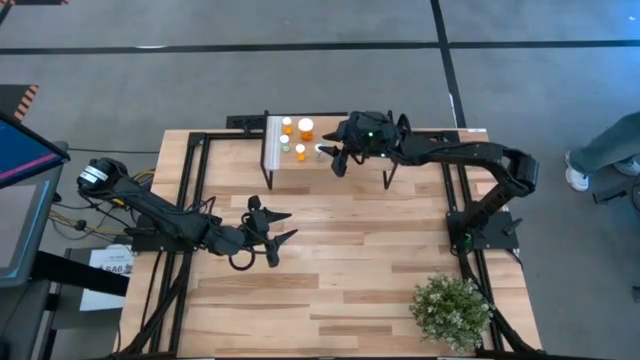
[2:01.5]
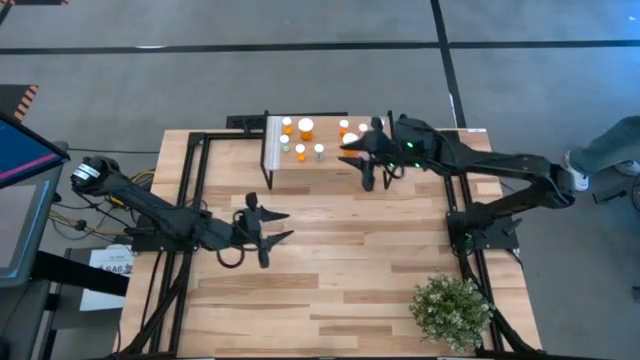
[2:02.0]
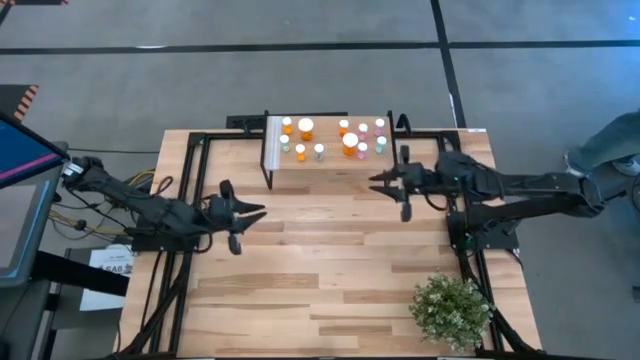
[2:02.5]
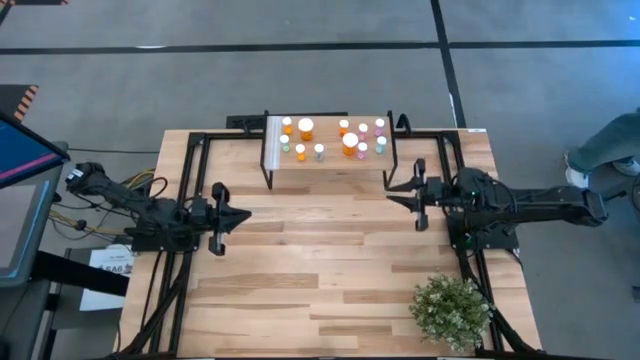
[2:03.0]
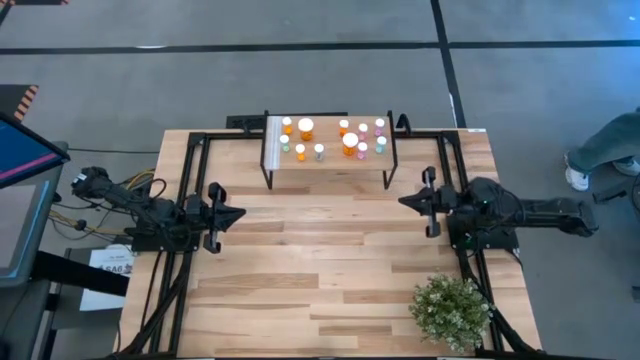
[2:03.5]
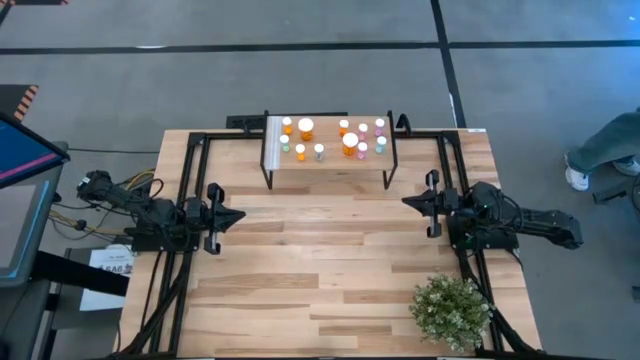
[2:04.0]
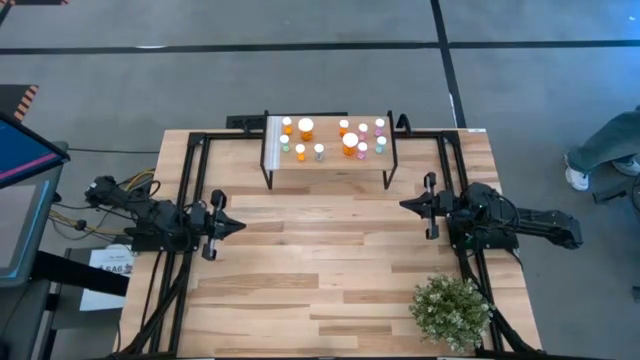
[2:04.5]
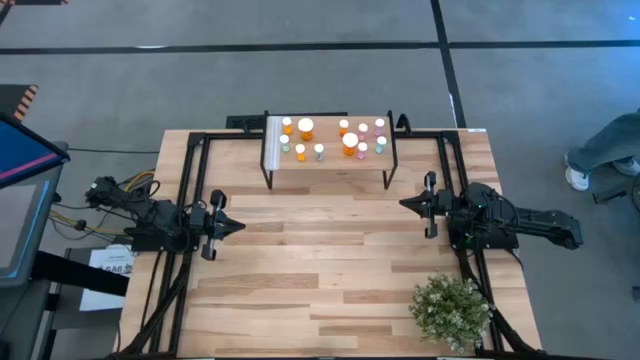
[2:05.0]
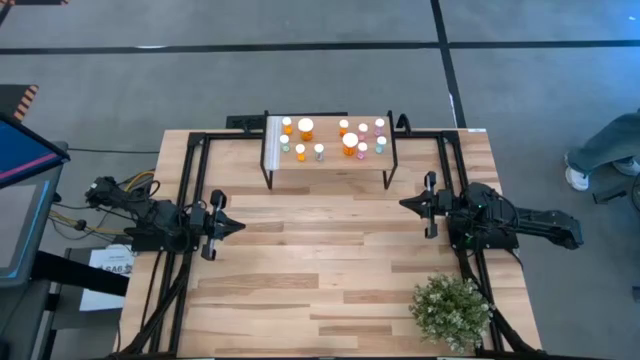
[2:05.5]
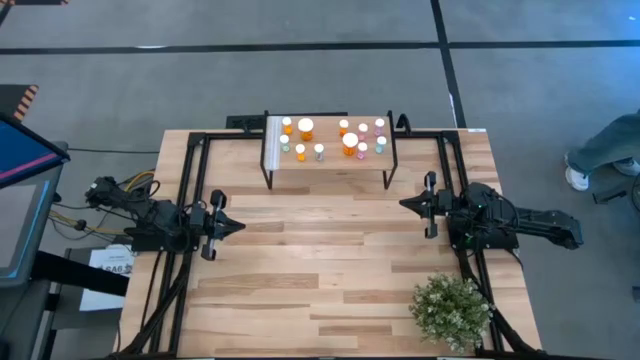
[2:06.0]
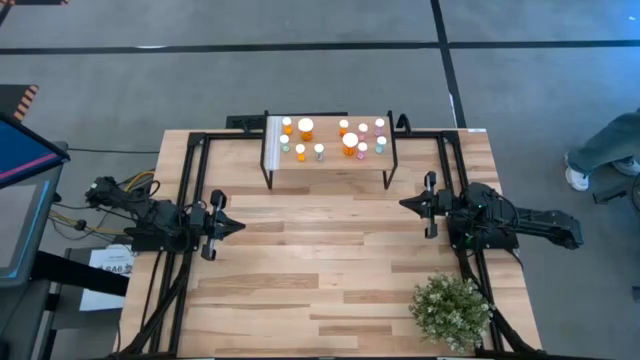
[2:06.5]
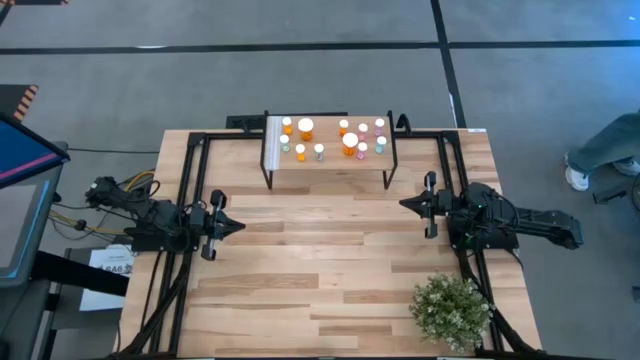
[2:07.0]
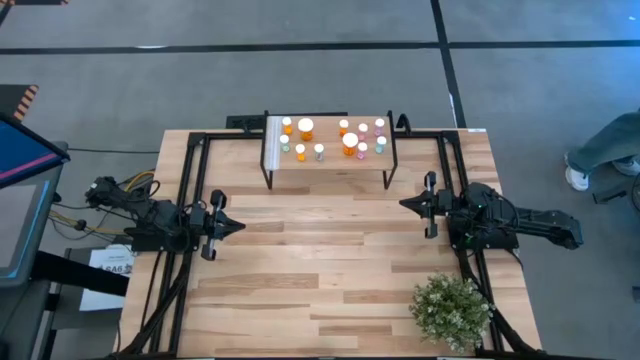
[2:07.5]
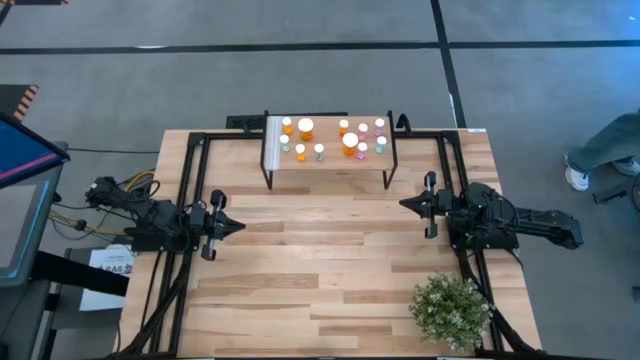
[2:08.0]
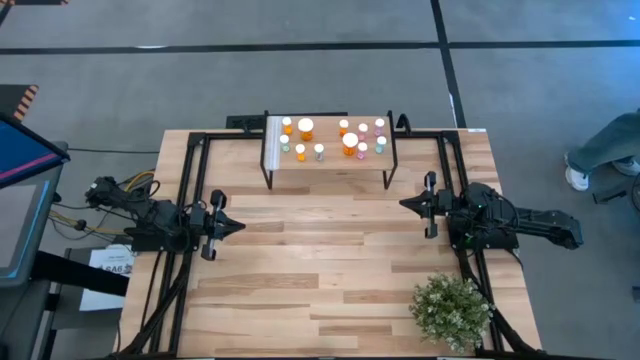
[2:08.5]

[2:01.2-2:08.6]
Task: Pick and place medicine bottles onto shelf by color
Return to Home Position

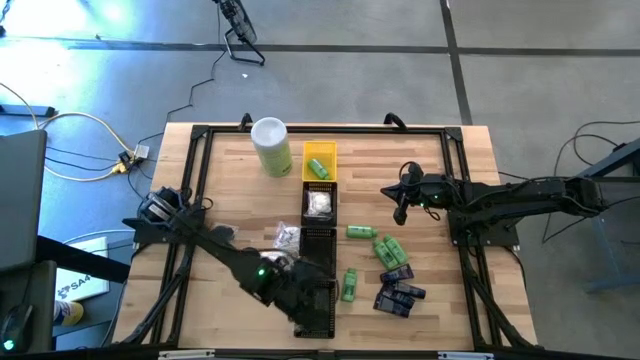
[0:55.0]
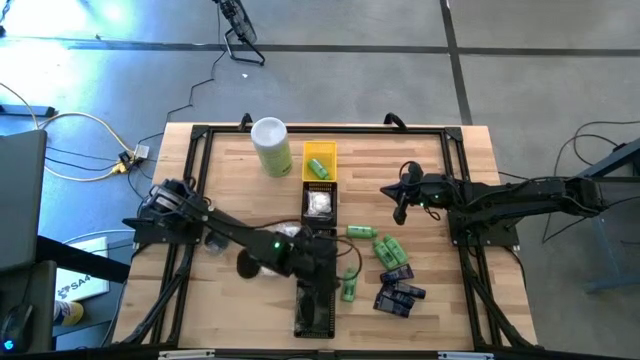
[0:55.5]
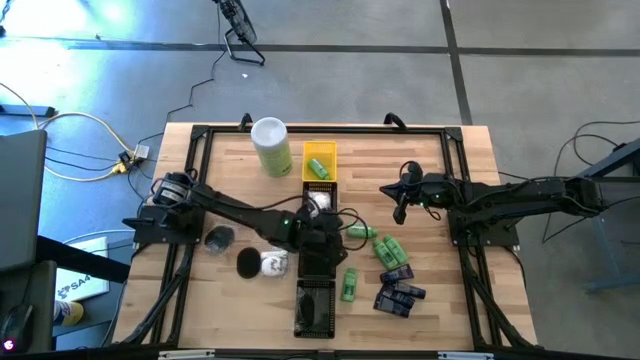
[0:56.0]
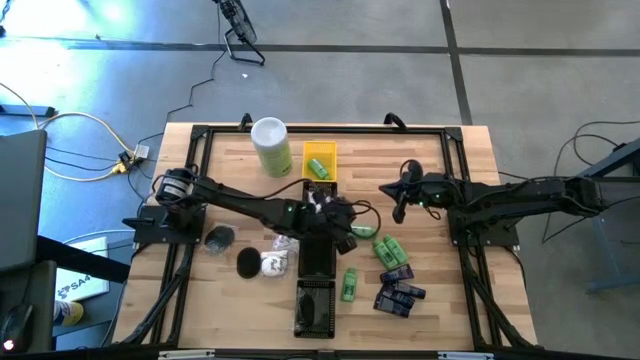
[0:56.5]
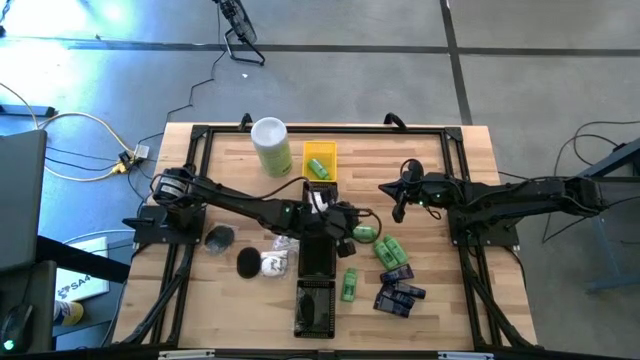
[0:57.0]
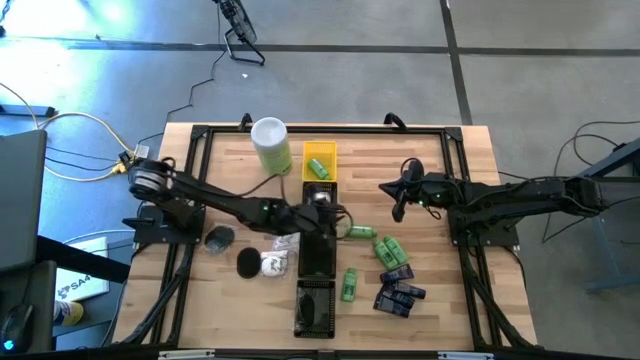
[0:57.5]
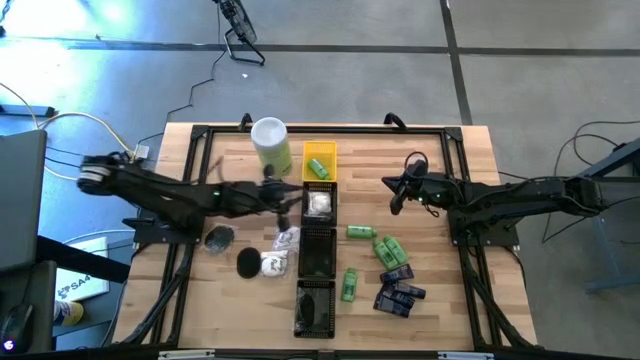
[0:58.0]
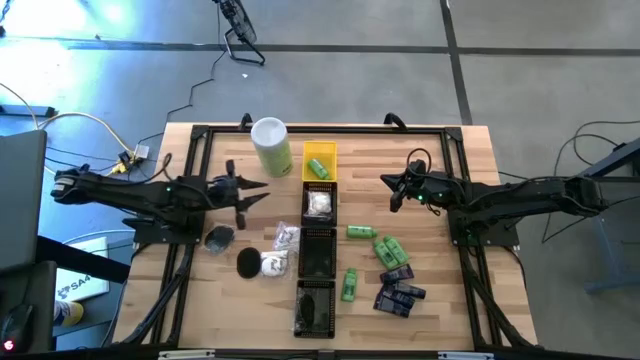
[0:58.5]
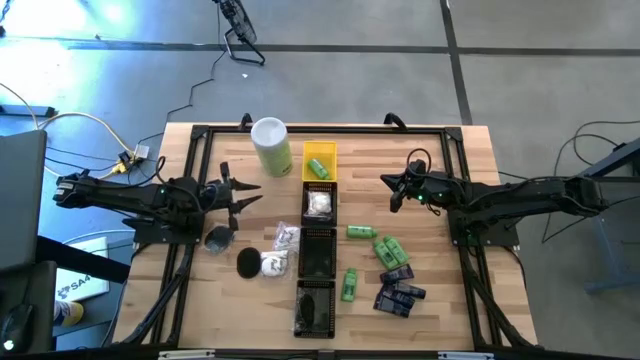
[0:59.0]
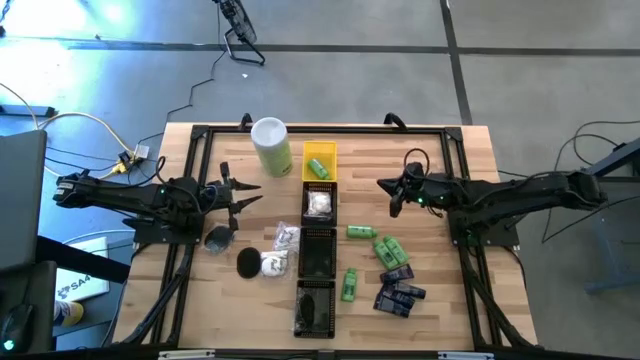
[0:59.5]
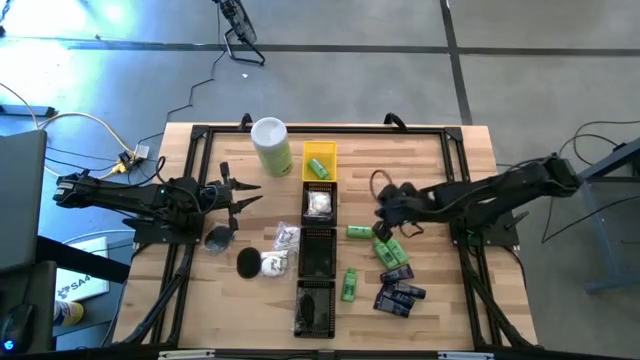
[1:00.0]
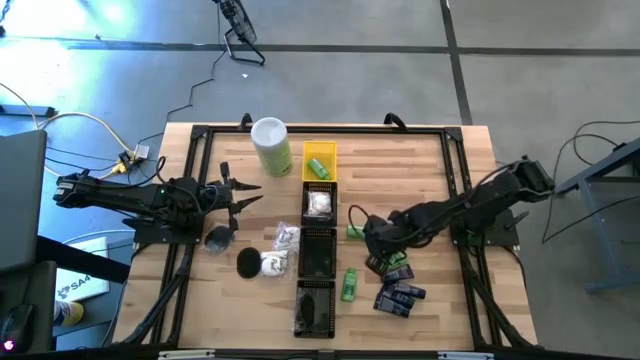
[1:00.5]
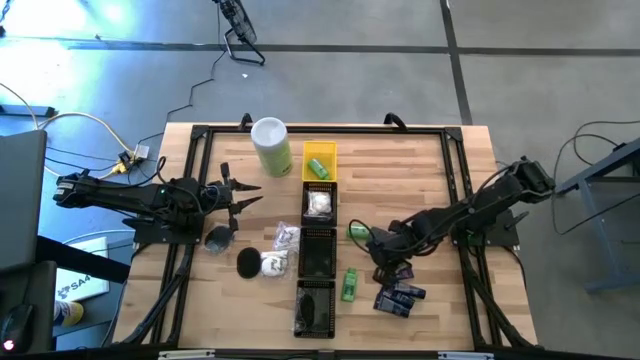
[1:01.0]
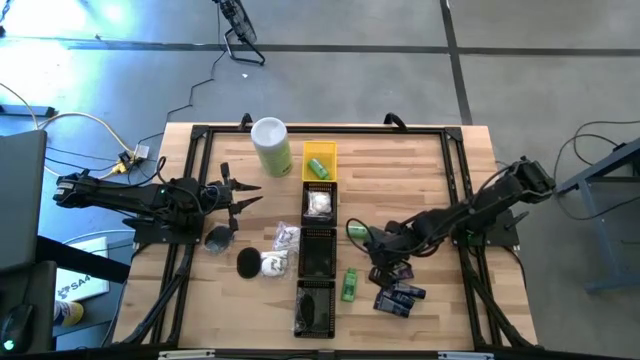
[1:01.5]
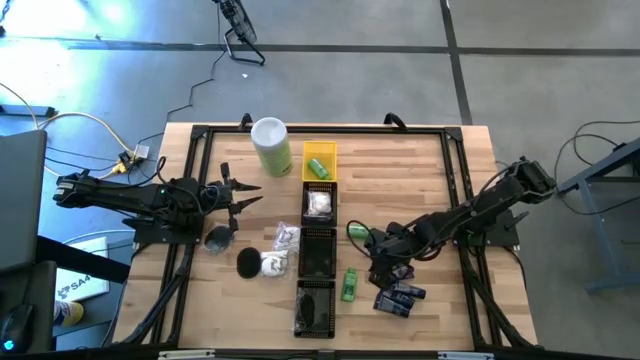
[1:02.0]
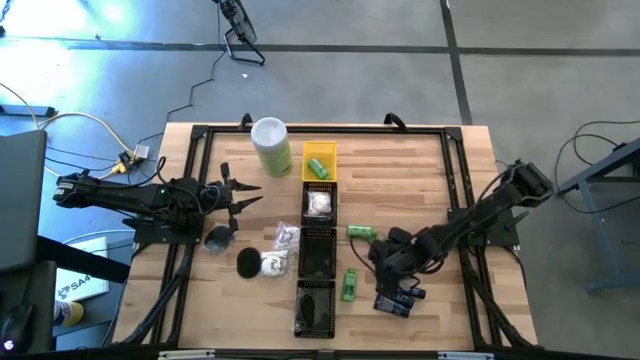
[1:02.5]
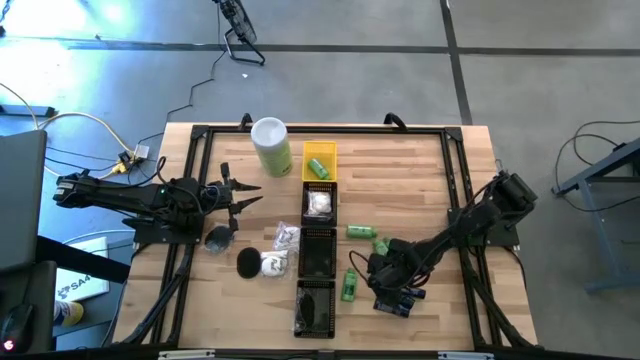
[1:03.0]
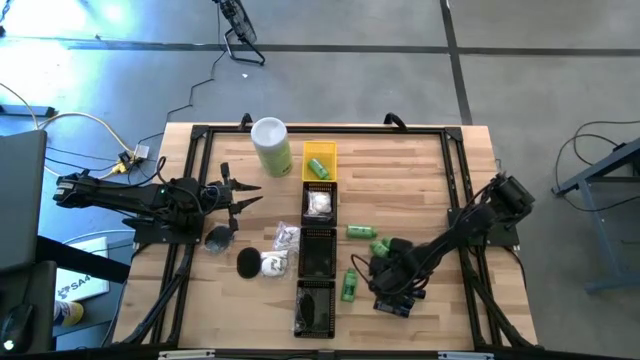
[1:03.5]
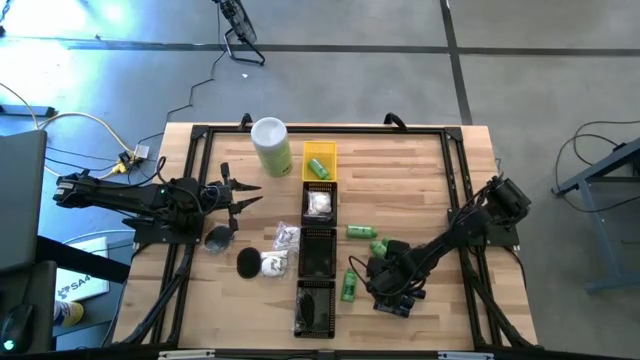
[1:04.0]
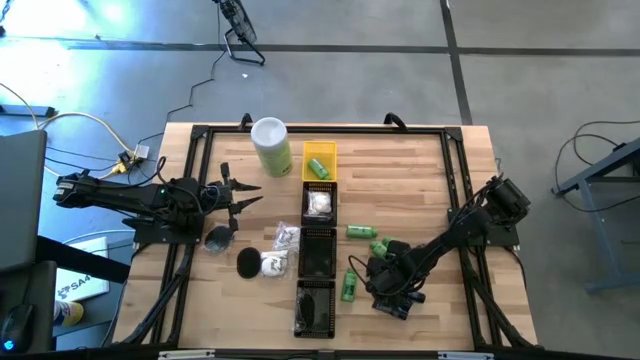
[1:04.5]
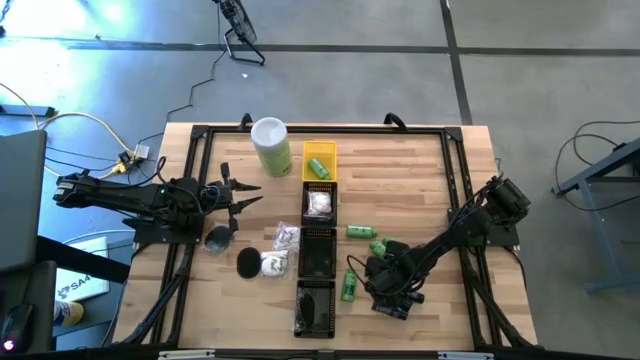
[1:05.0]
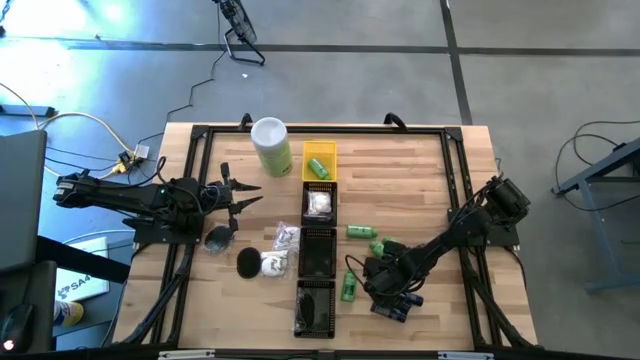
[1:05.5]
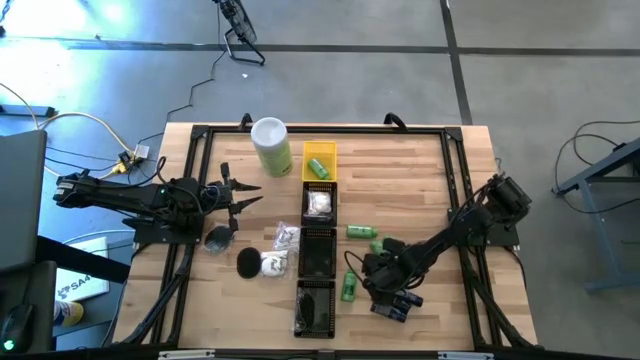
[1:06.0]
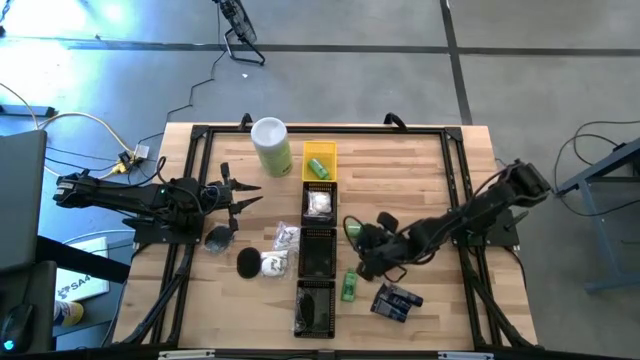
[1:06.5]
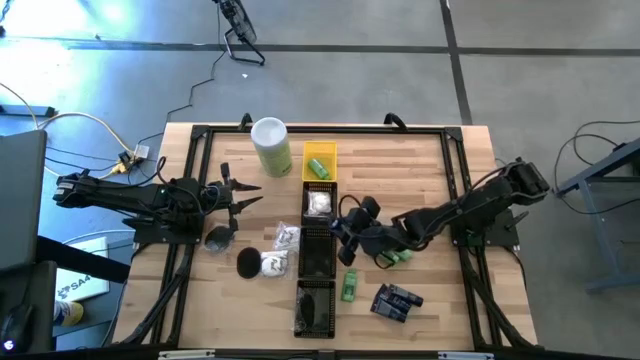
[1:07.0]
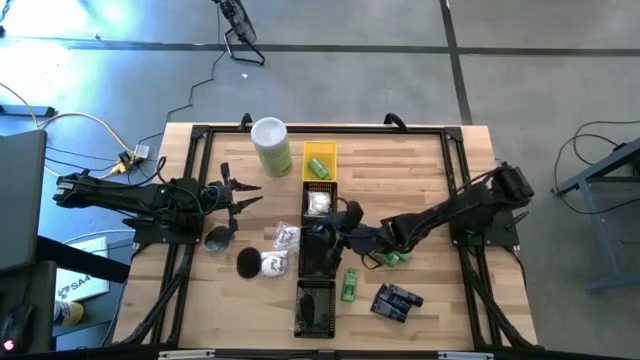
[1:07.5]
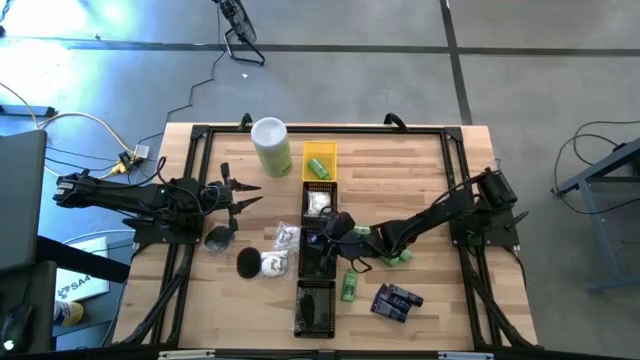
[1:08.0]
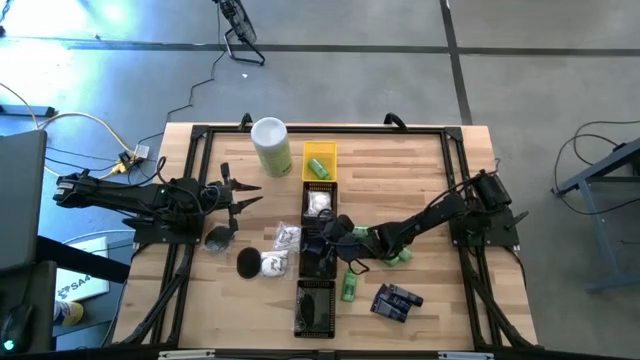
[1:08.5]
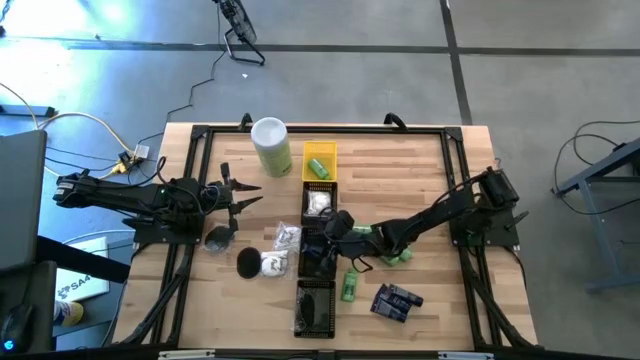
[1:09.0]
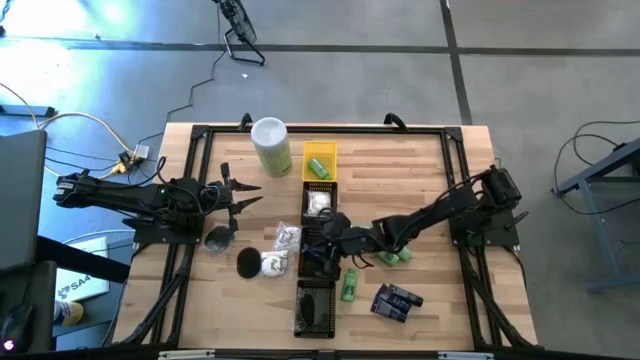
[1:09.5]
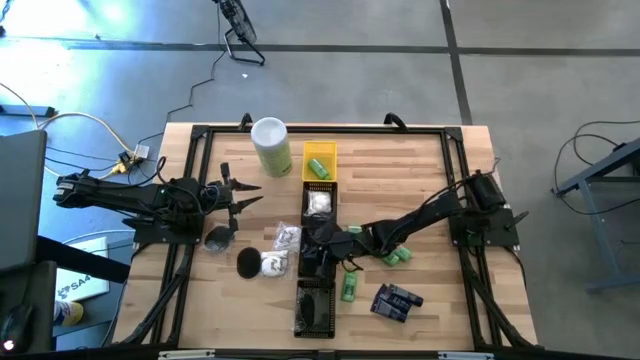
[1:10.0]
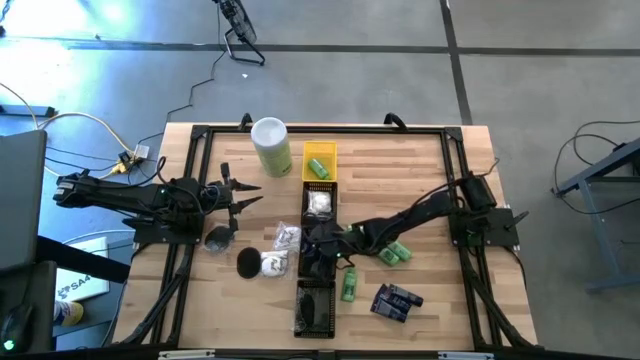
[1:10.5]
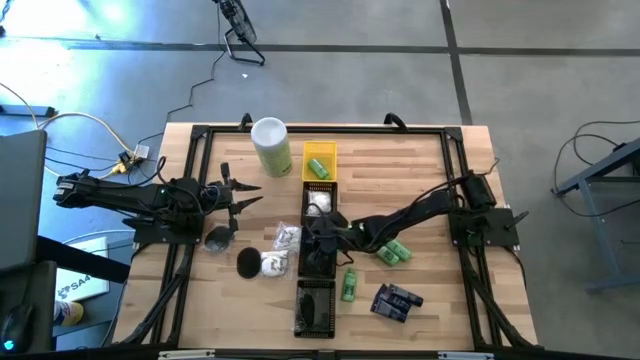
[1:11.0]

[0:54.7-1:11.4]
Task: Pick & Place Travel size toiletries
Put the dark blue bottle into the center black basket
